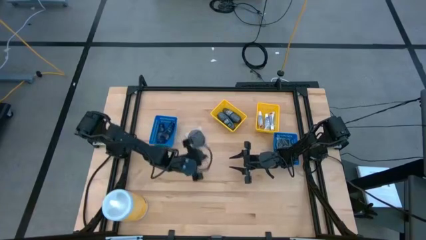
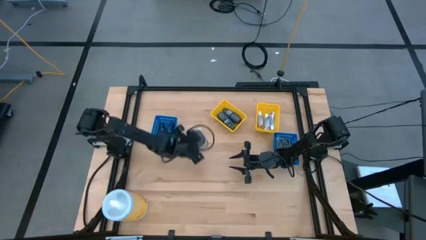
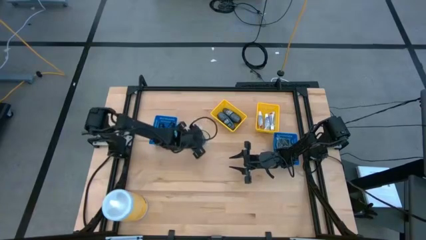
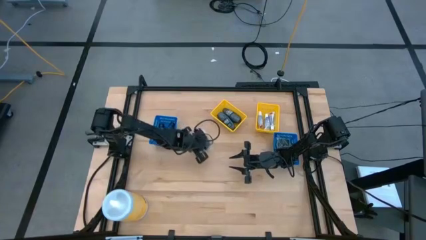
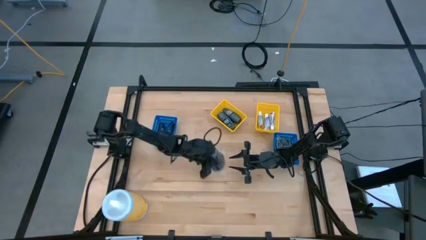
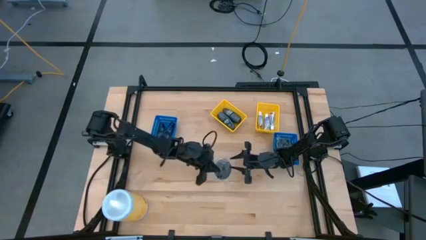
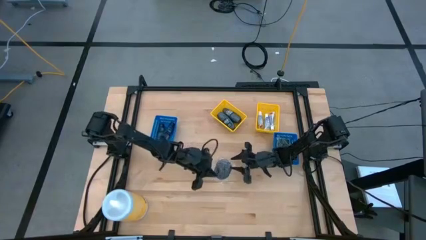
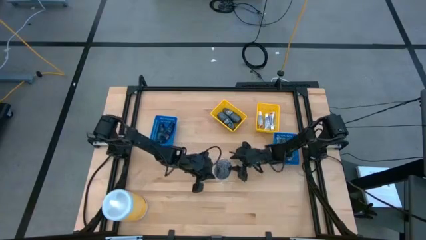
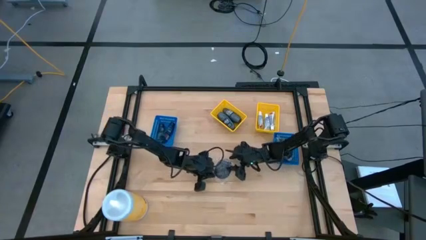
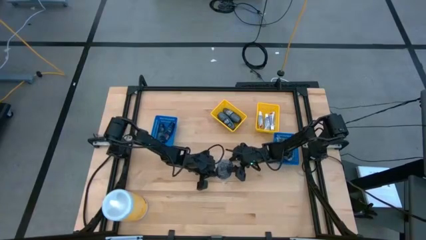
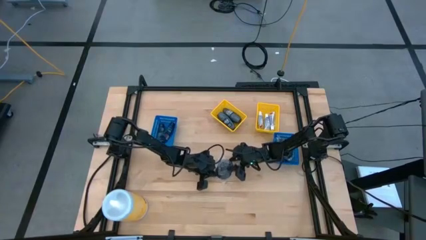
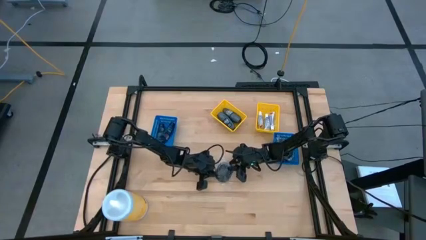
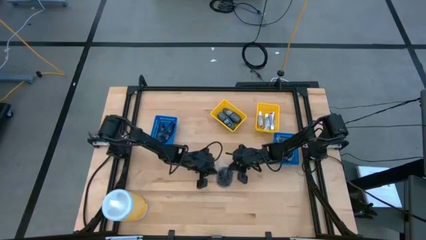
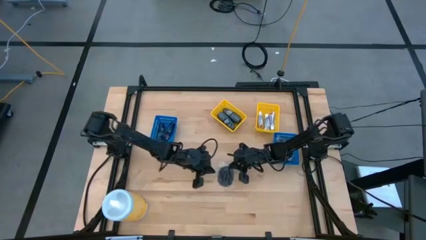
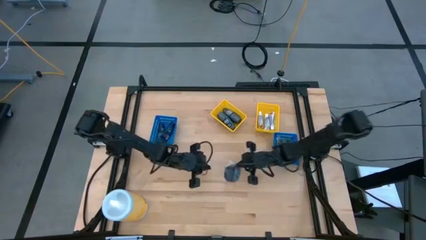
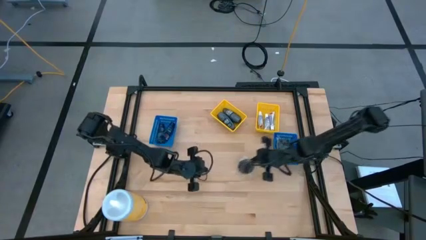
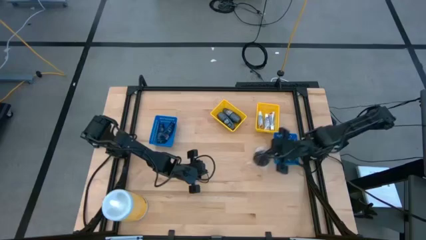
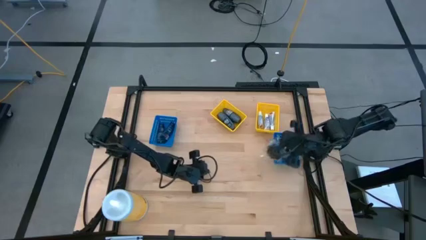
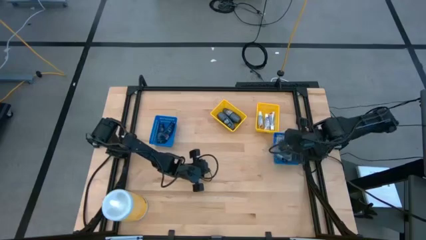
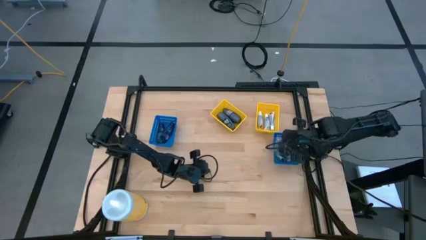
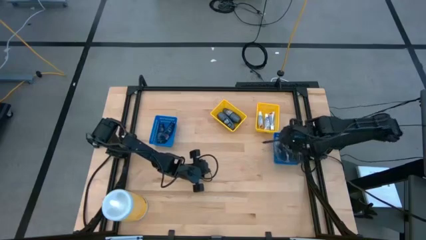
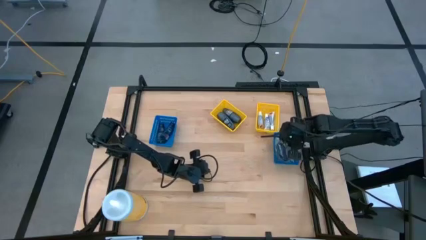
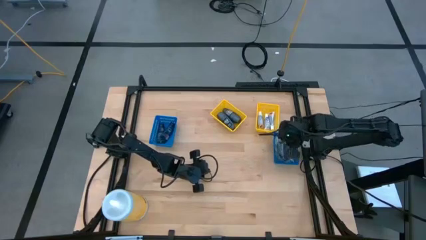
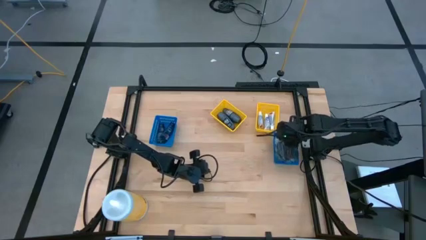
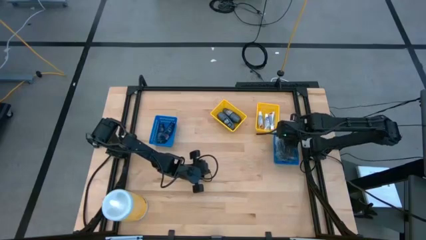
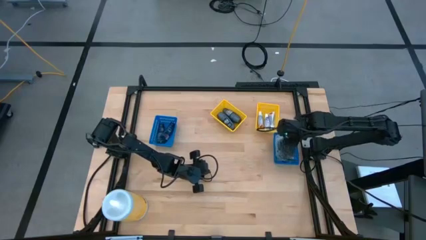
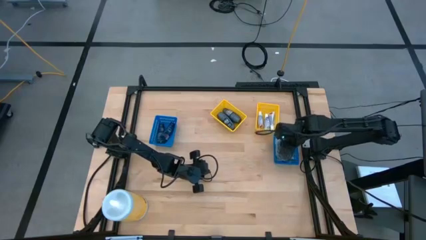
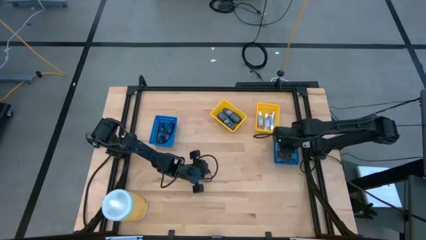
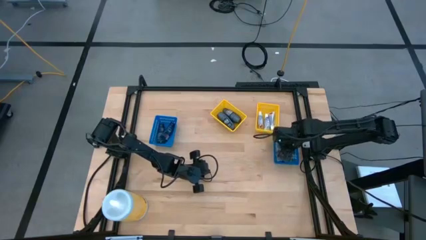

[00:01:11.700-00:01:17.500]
Task: Pick & Place Travel size toiletries
Put the black hairbrush into the right blue bin

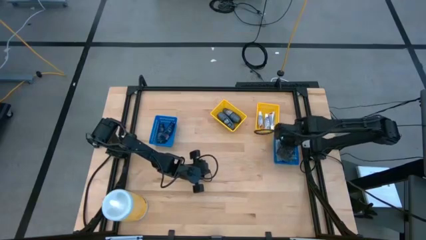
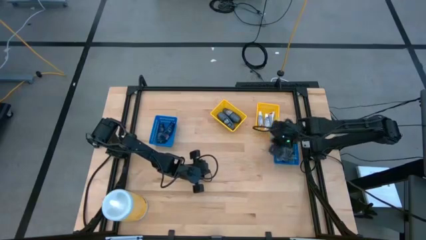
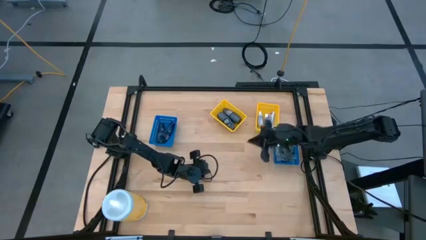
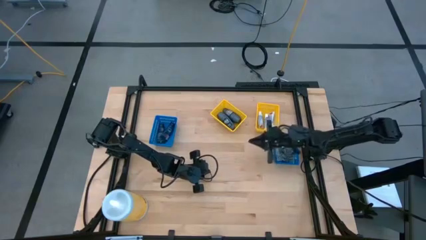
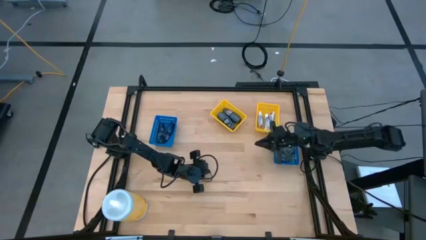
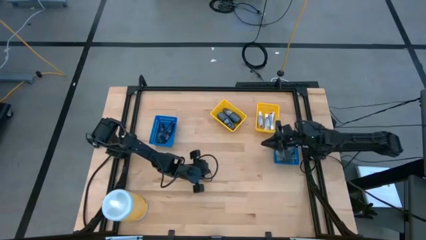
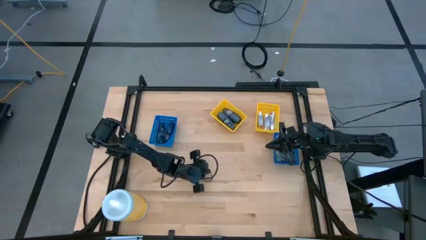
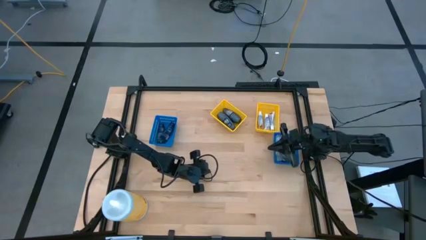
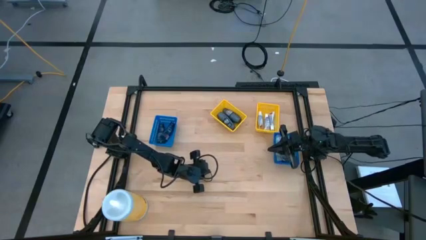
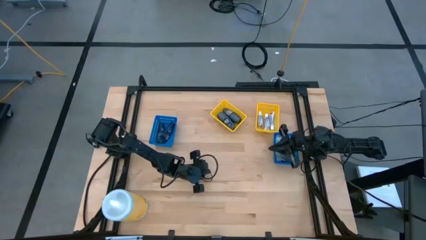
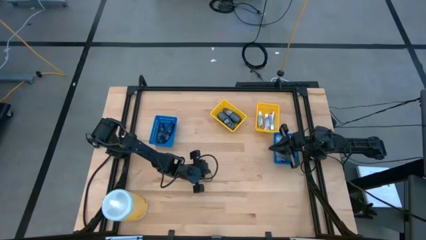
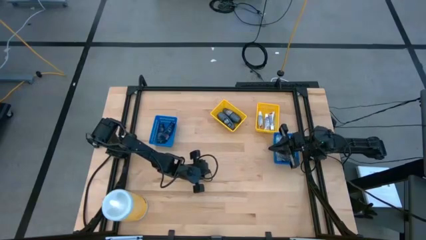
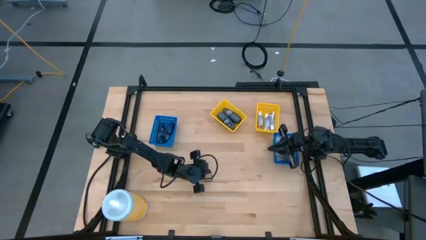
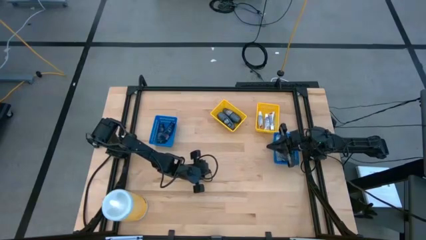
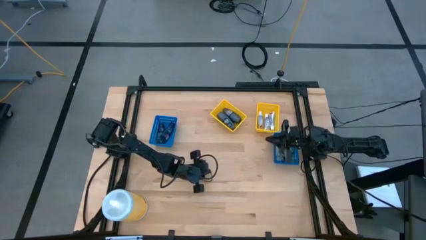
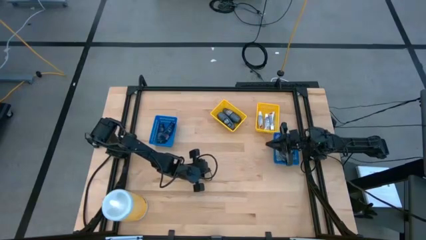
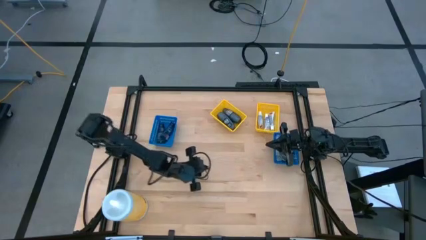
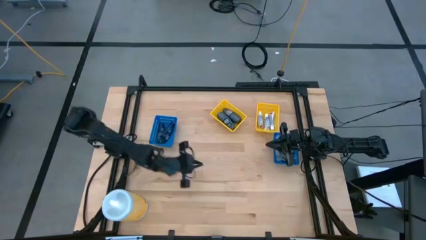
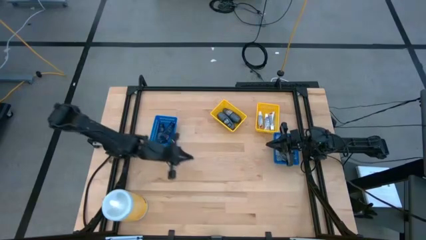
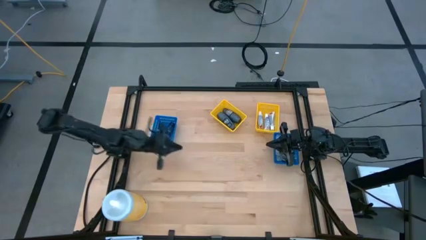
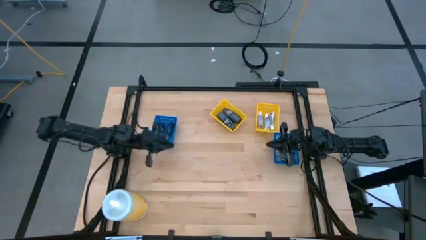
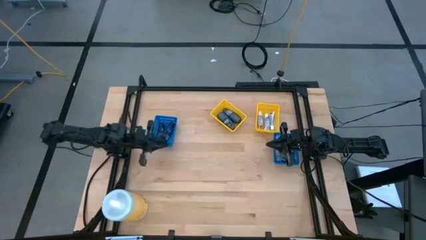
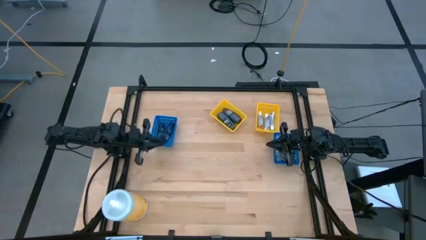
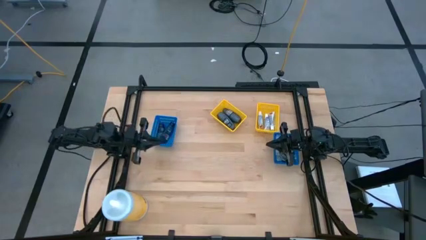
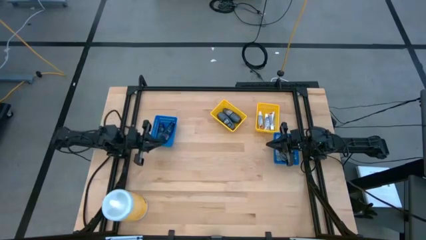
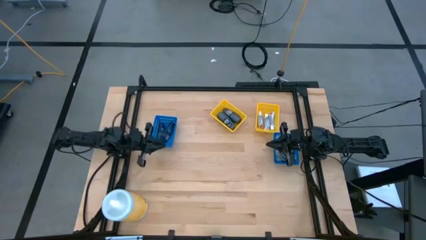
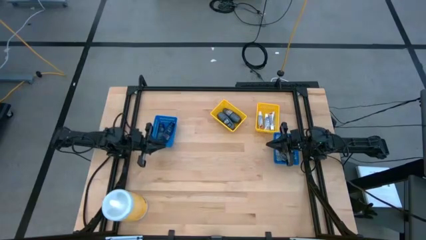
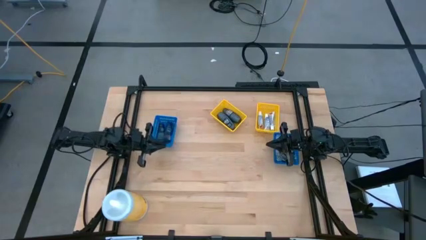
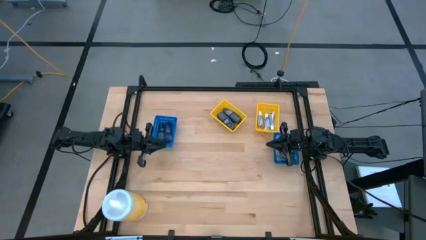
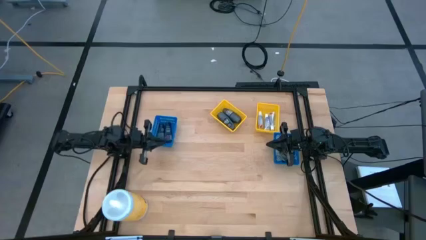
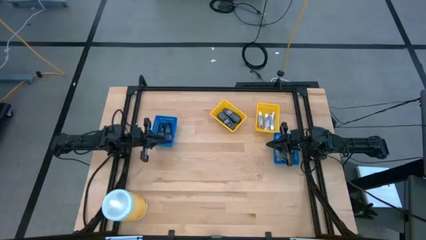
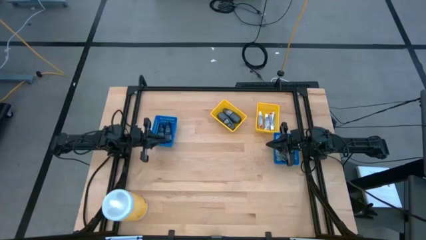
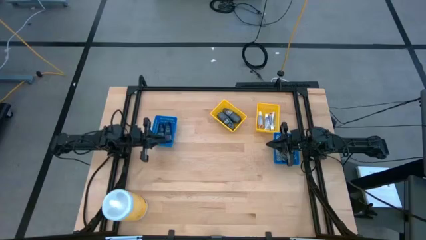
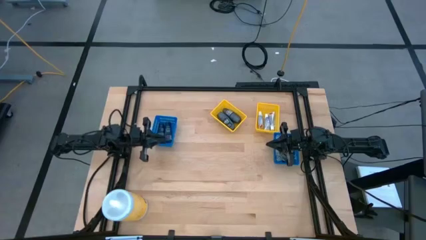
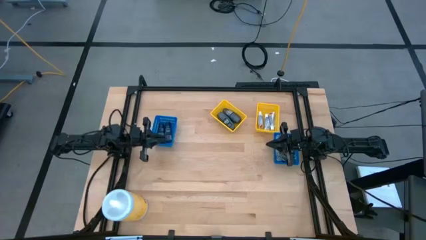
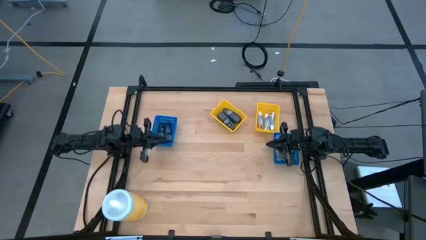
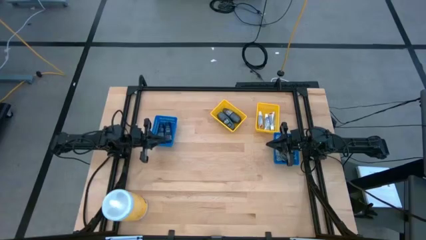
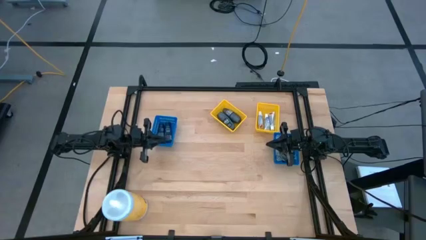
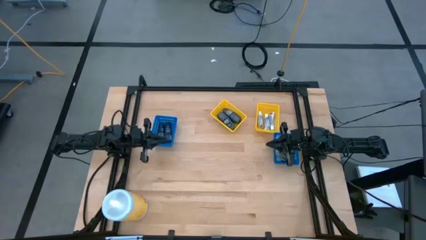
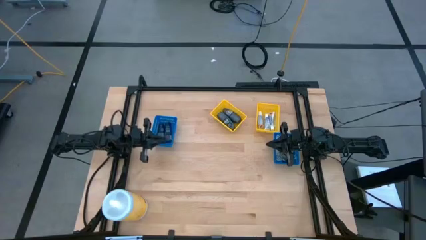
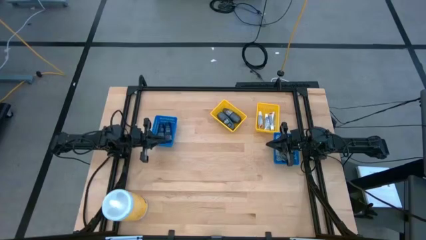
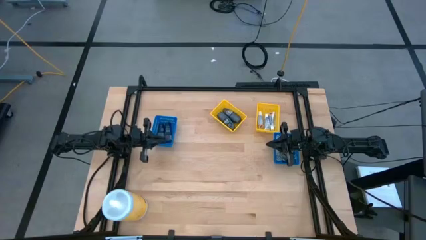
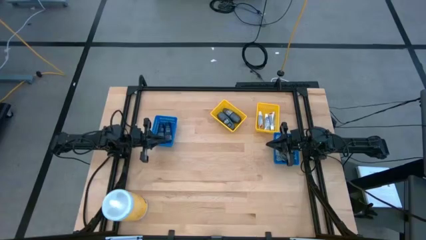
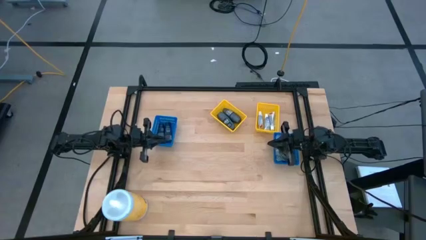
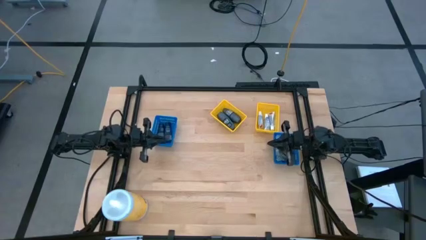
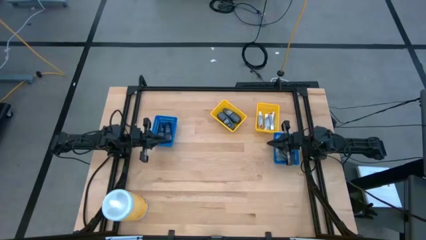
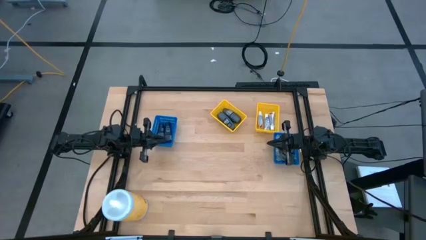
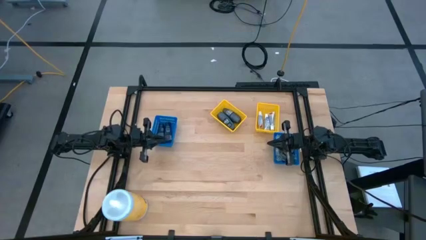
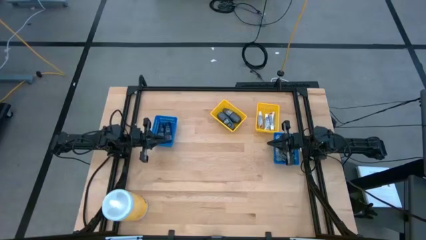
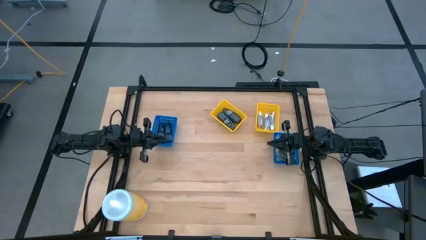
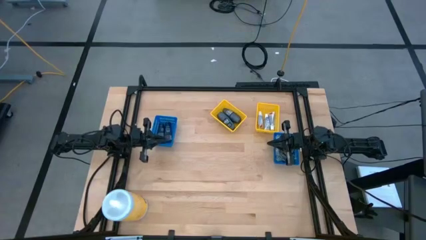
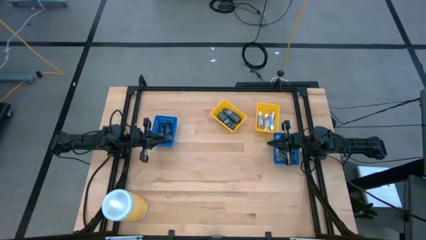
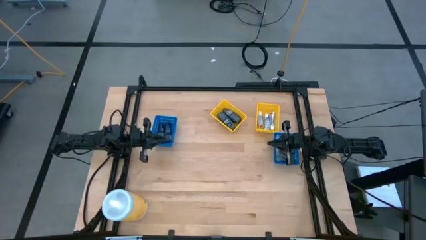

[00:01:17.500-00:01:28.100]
Return to Home Position
